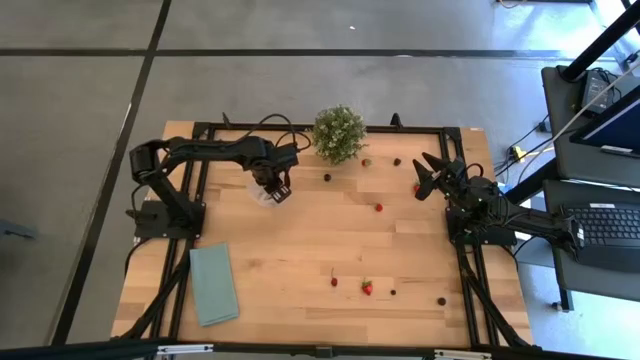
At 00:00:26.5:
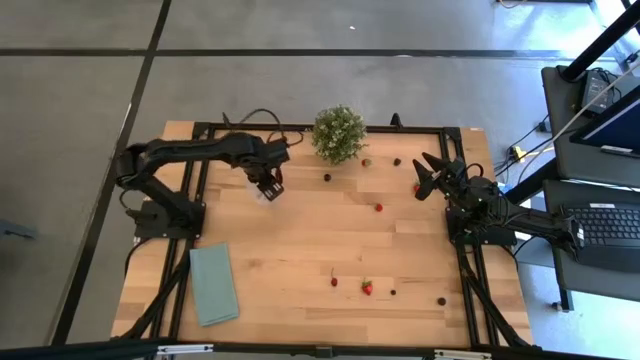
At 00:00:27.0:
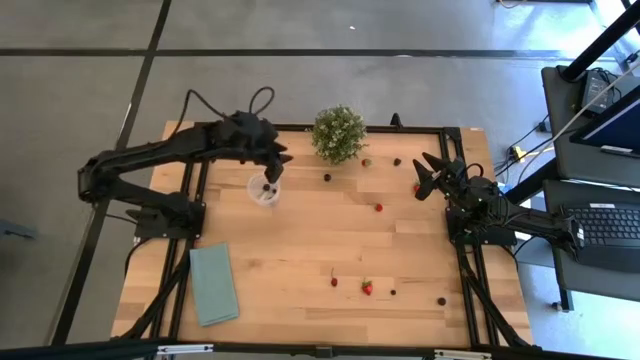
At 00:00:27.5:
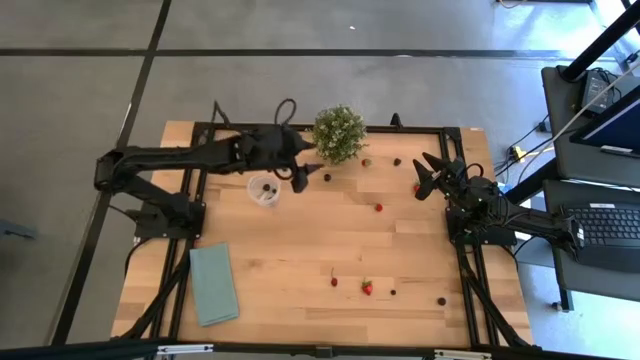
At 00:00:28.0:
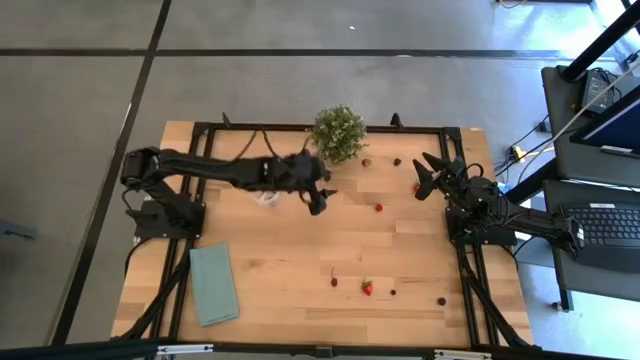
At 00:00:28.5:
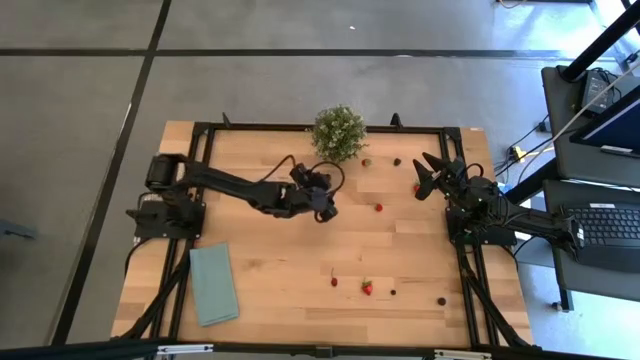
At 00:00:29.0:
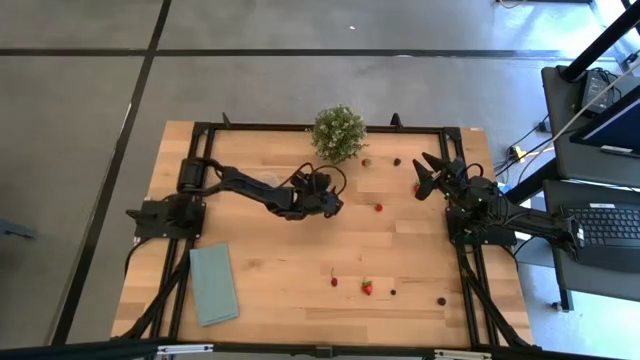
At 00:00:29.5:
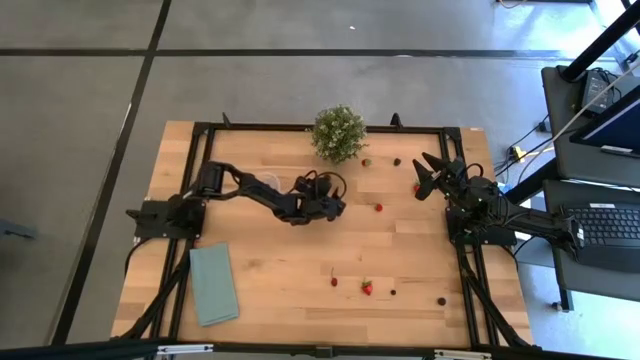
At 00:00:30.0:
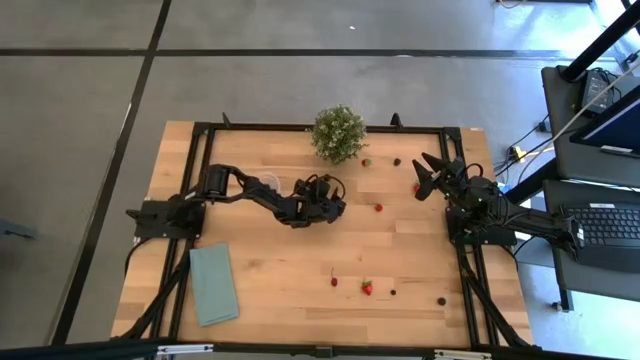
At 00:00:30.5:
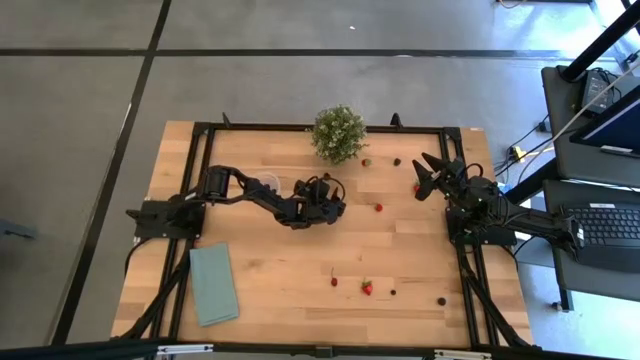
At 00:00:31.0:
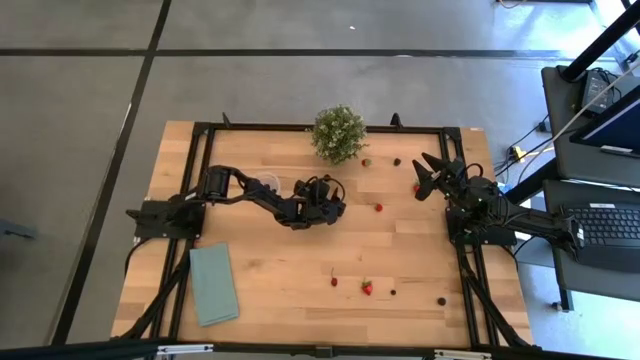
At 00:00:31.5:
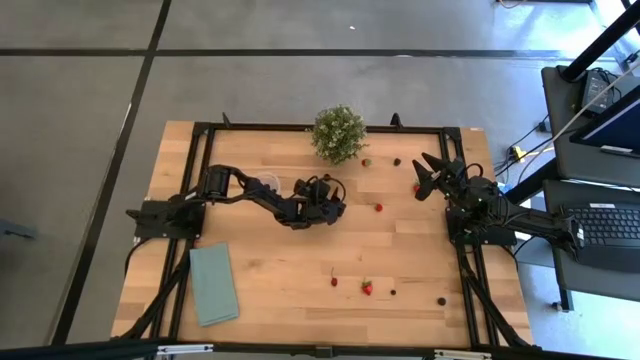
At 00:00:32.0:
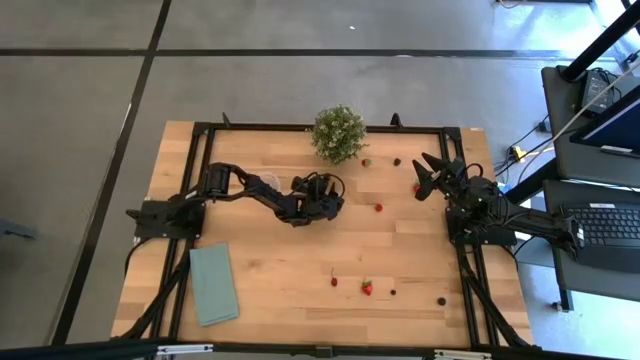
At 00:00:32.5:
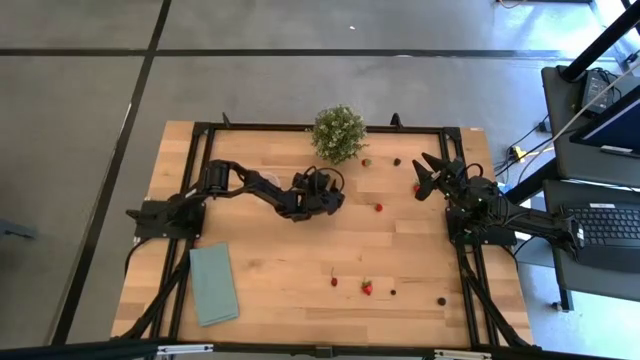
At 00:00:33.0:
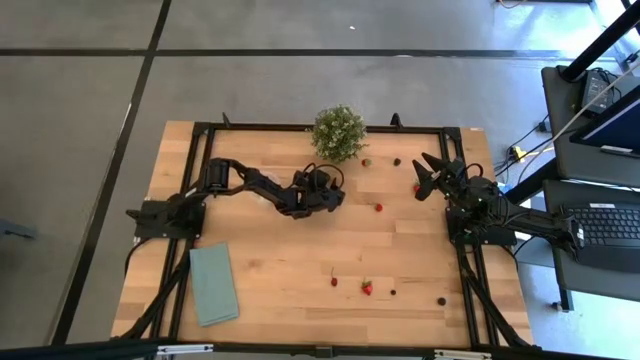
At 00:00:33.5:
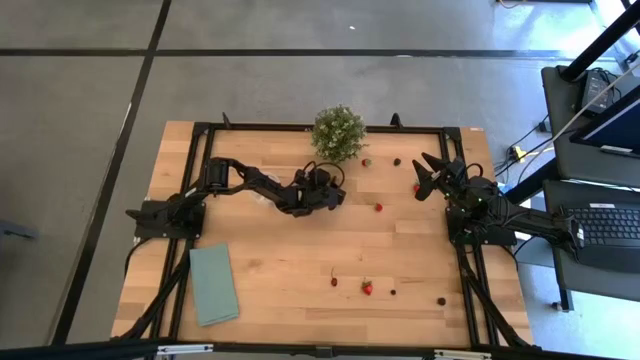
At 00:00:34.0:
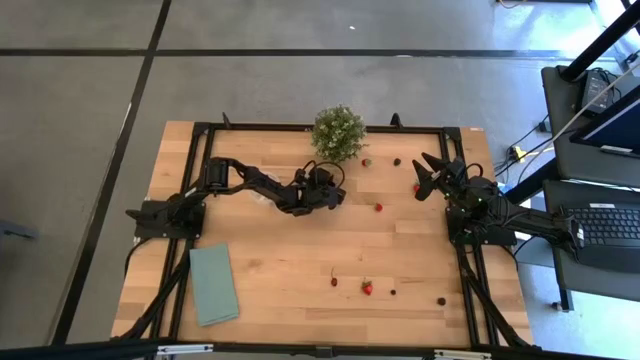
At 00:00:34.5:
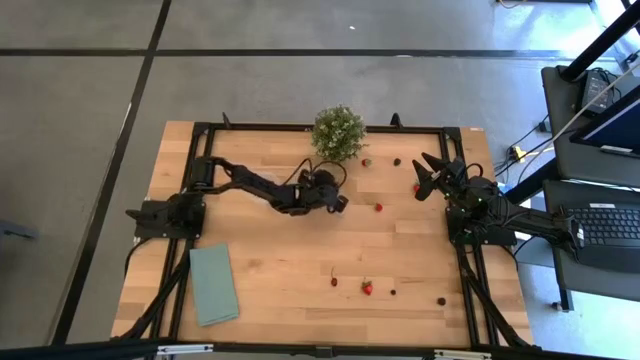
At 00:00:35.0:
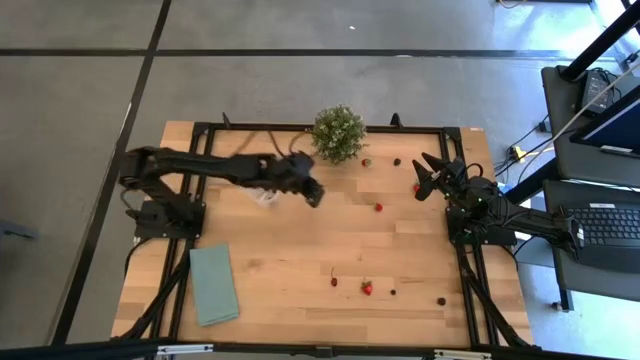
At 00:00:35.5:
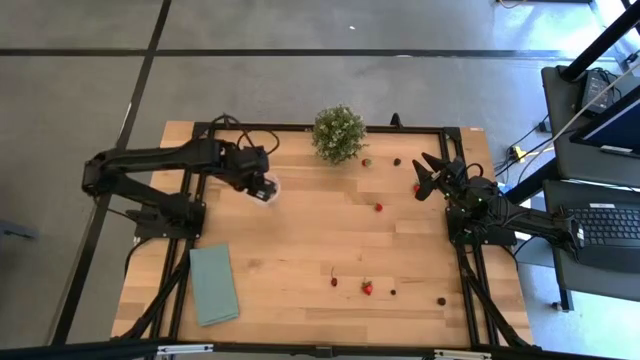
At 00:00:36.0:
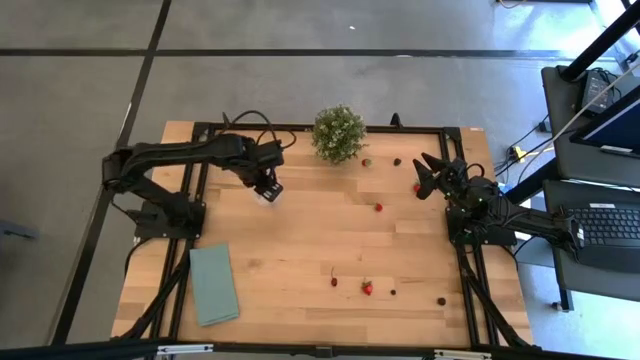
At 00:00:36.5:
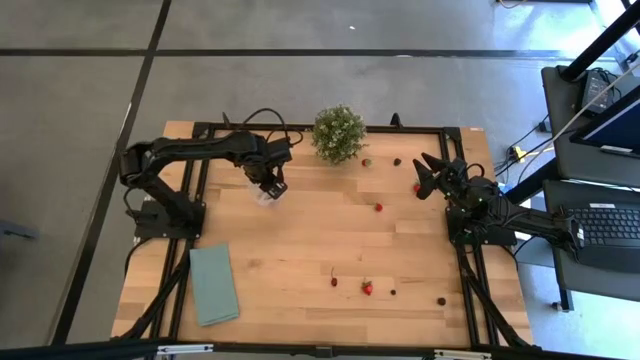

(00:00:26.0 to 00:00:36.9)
Task: Pick and placing Produce into tupperware
Put the black cherry into the transparent container

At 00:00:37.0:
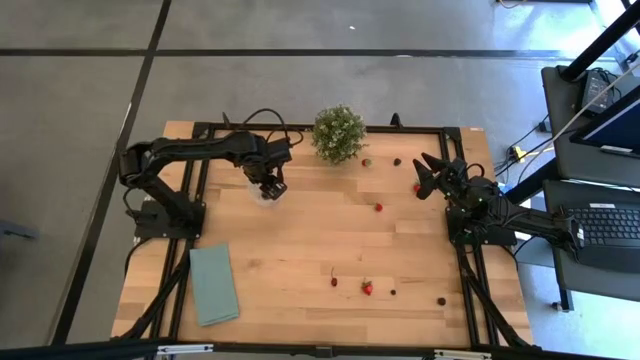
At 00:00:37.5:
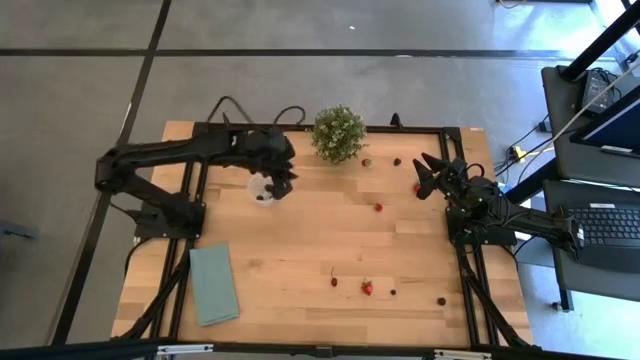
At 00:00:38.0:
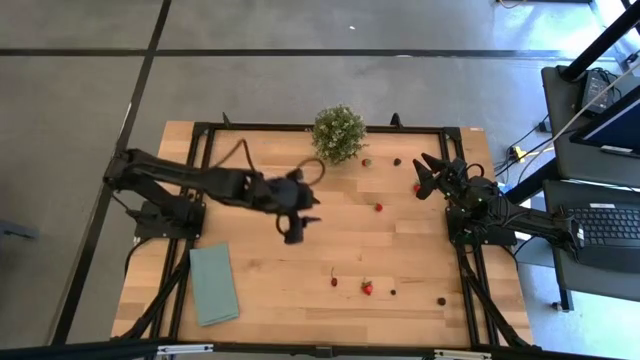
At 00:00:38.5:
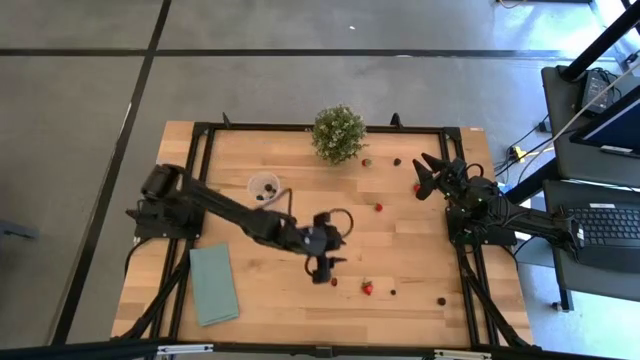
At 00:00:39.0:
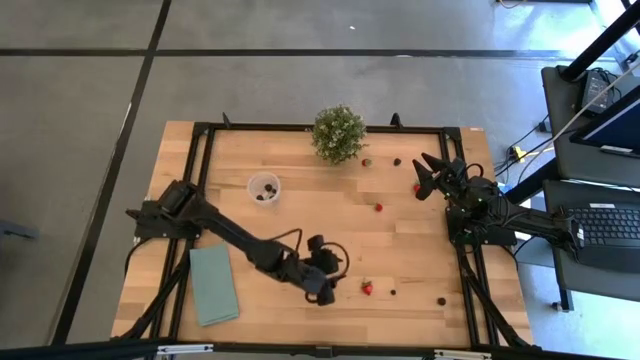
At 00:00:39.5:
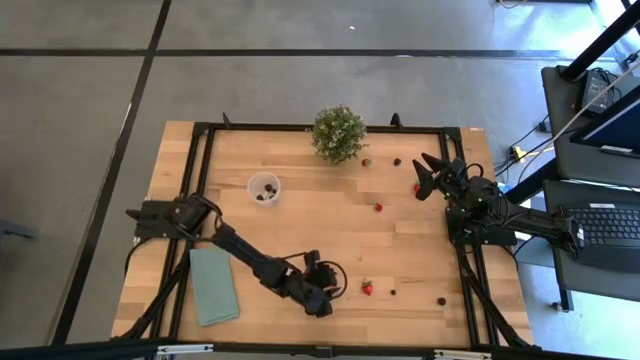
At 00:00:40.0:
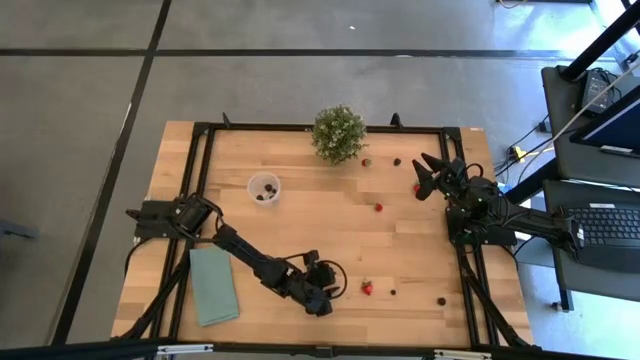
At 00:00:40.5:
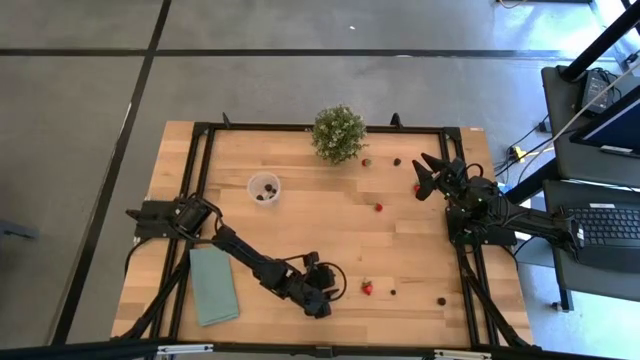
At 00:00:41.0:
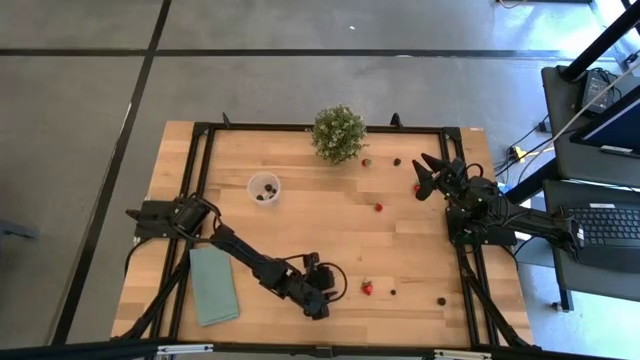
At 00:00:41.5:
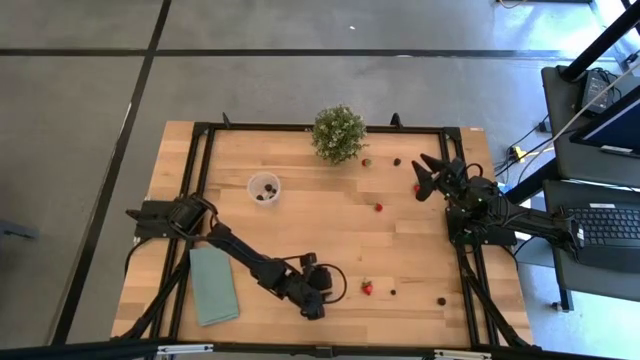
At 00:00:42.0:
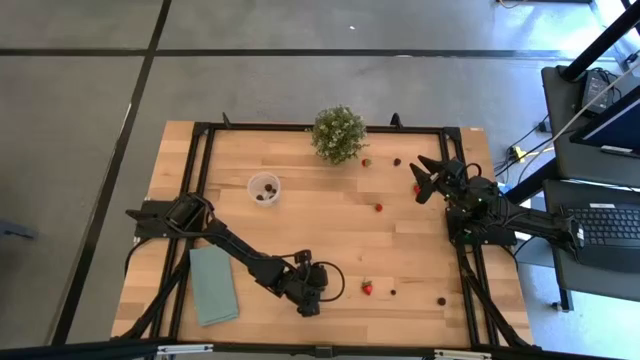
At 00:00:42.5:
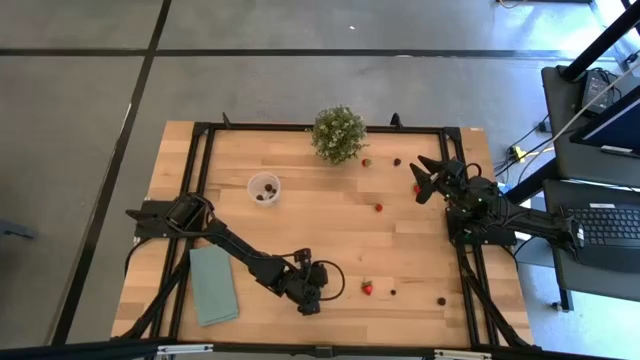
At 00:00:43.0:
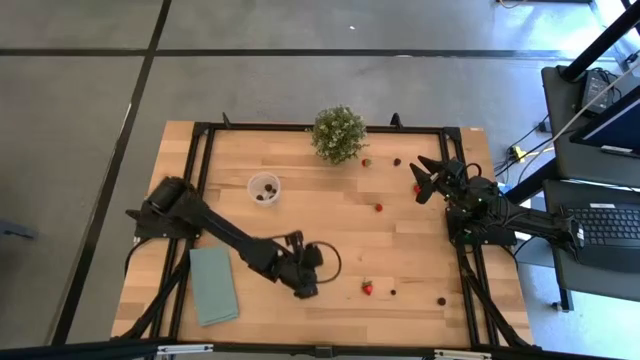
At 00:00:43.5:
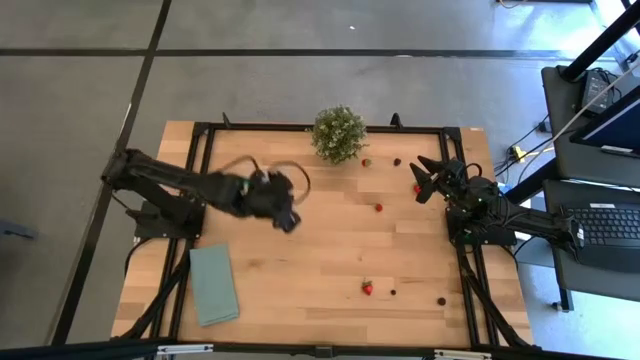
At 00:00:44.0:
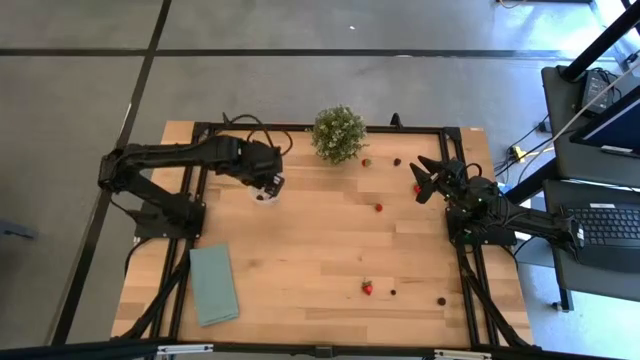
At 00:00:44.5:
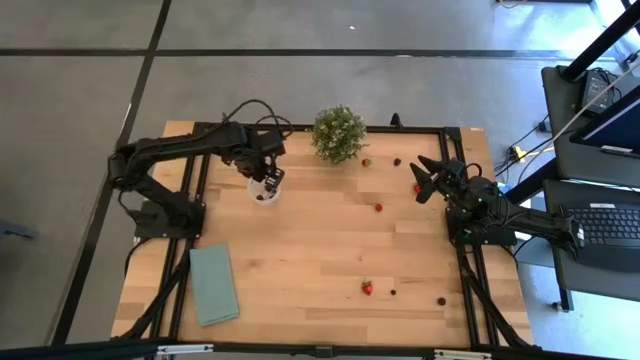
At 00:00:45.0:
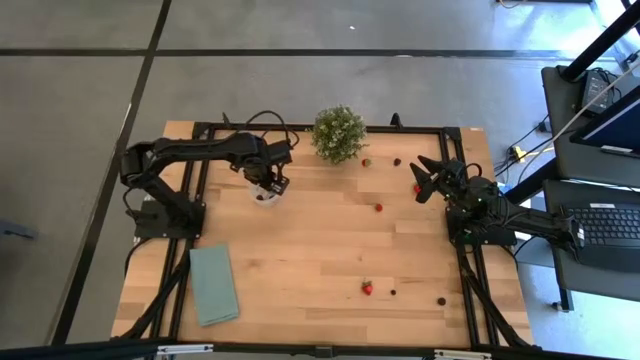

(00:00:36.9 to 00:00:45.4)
Put the red cherry into the transparent container
